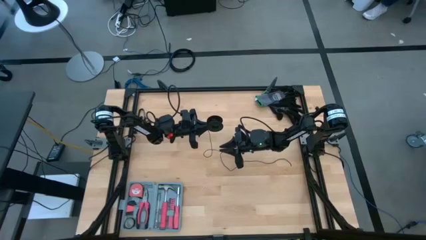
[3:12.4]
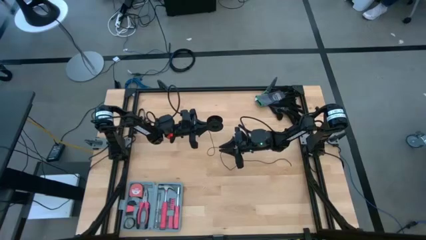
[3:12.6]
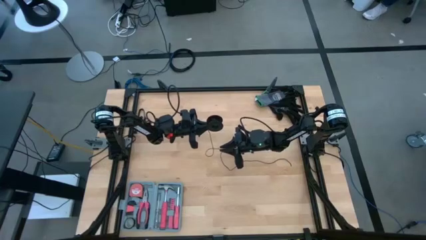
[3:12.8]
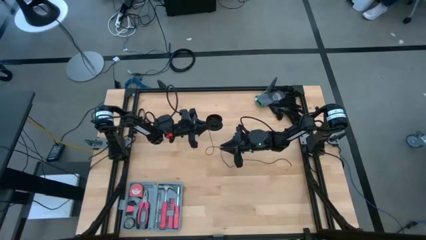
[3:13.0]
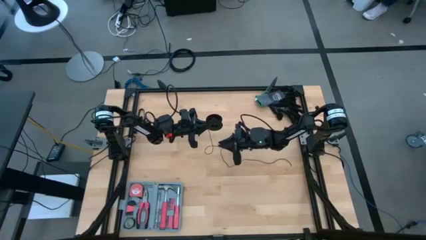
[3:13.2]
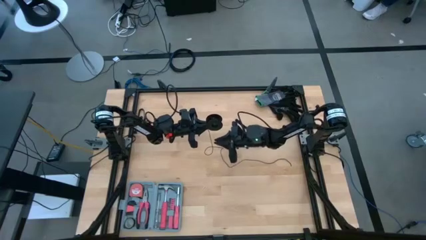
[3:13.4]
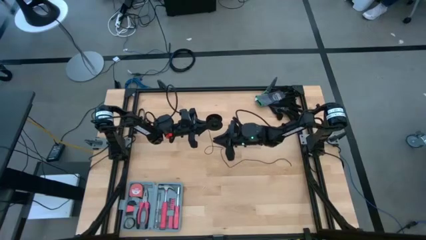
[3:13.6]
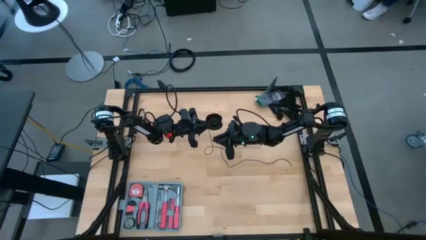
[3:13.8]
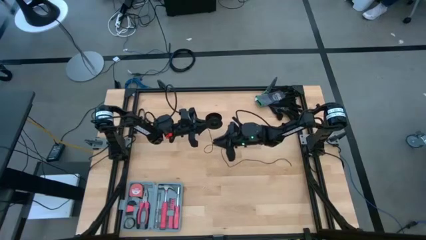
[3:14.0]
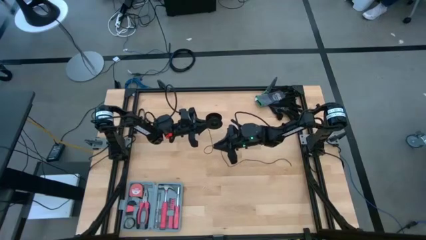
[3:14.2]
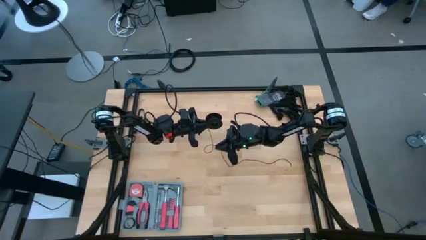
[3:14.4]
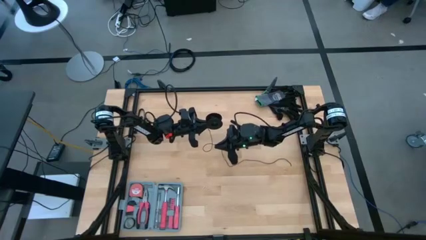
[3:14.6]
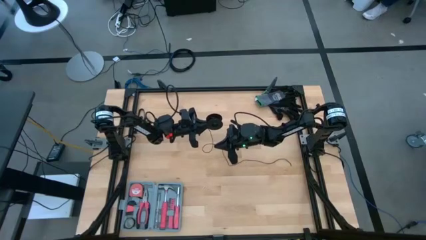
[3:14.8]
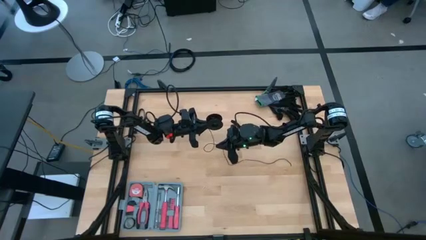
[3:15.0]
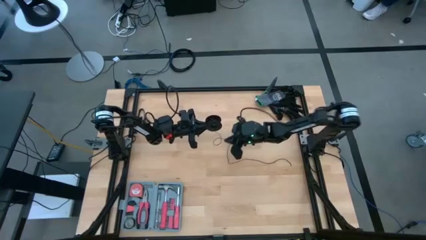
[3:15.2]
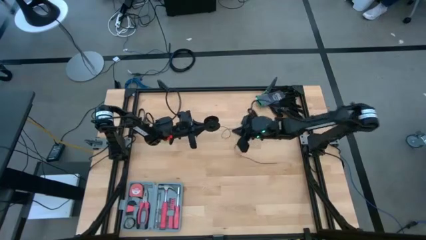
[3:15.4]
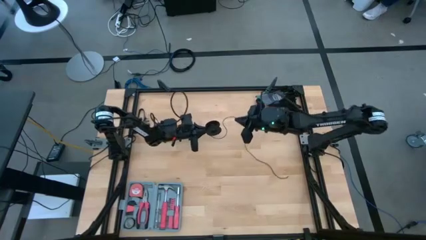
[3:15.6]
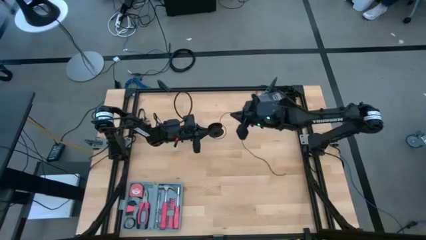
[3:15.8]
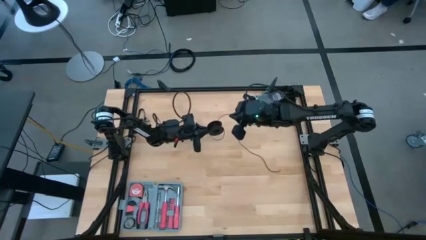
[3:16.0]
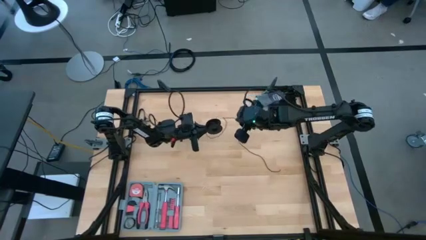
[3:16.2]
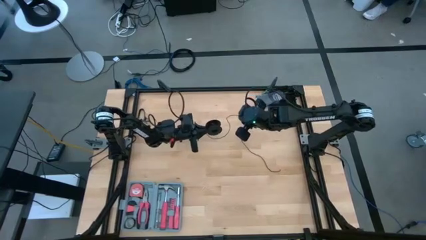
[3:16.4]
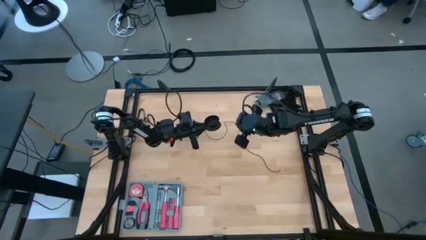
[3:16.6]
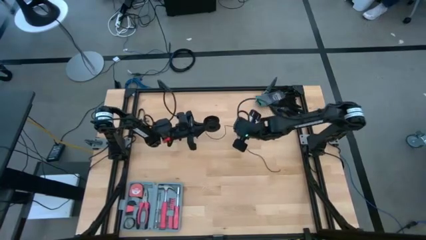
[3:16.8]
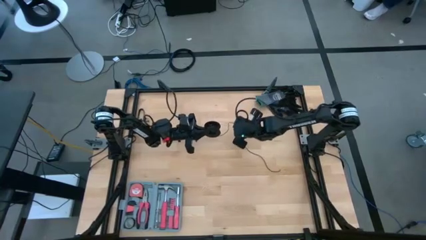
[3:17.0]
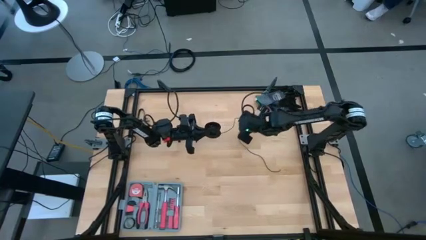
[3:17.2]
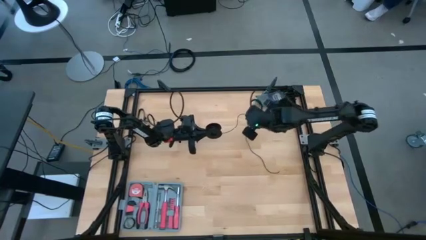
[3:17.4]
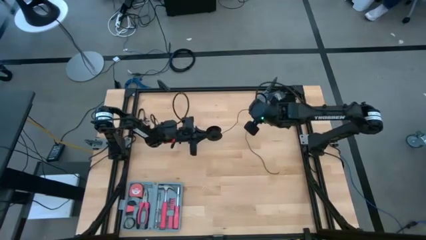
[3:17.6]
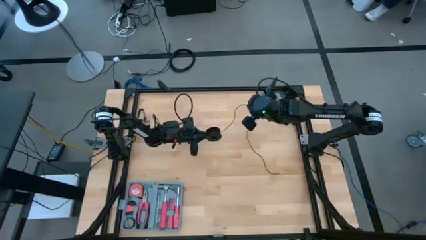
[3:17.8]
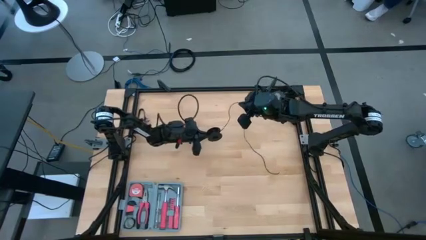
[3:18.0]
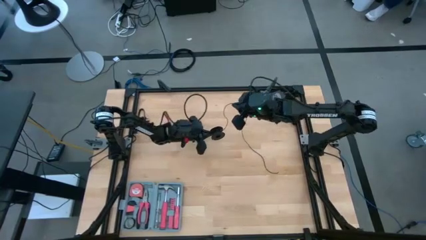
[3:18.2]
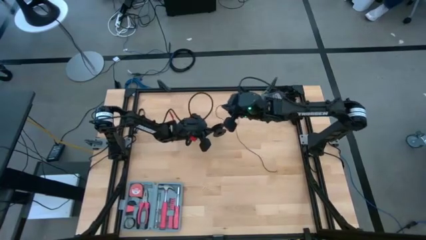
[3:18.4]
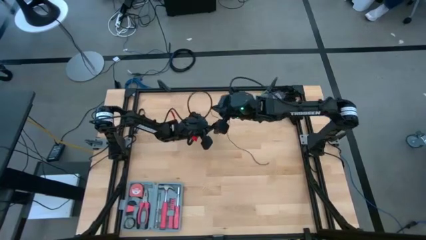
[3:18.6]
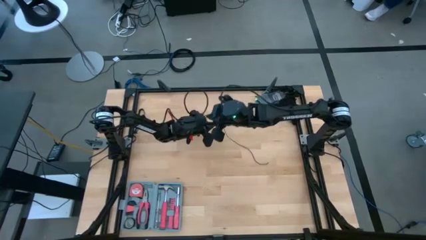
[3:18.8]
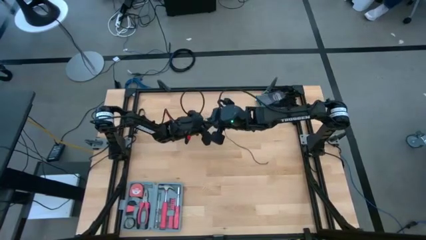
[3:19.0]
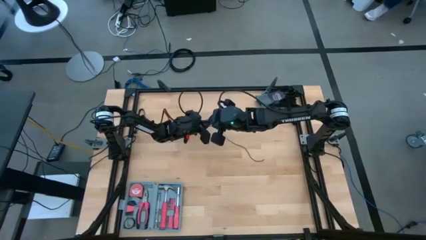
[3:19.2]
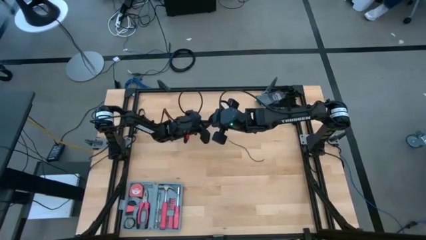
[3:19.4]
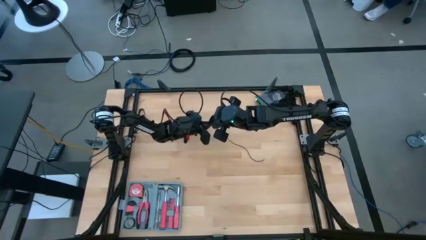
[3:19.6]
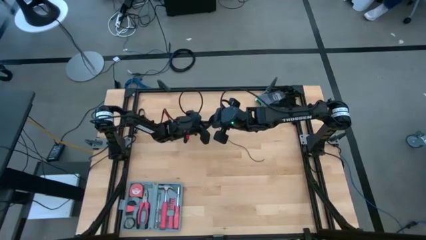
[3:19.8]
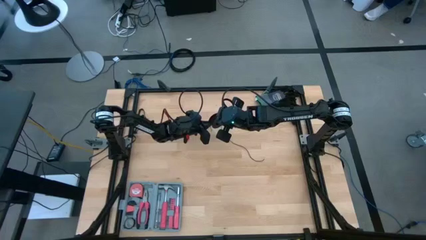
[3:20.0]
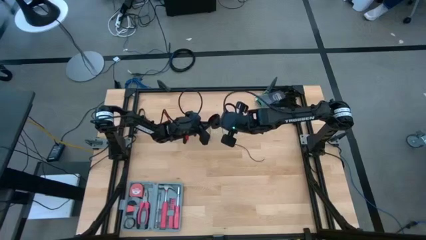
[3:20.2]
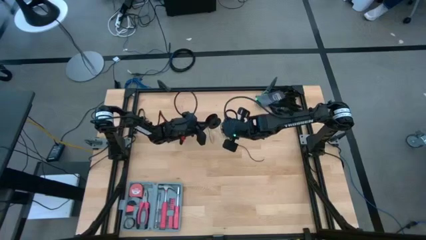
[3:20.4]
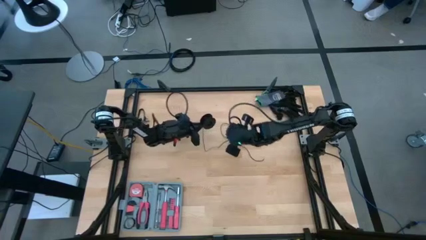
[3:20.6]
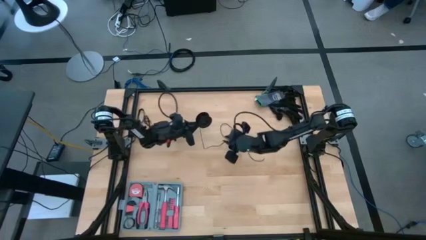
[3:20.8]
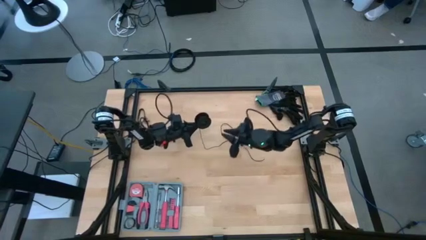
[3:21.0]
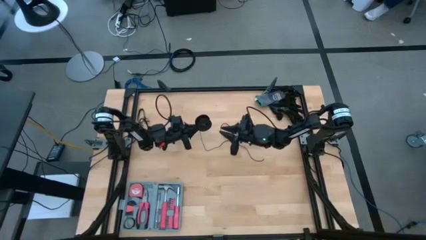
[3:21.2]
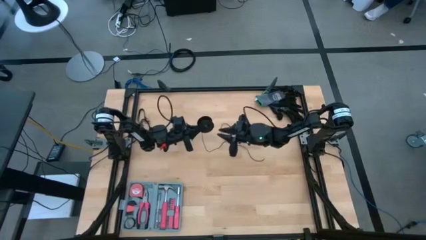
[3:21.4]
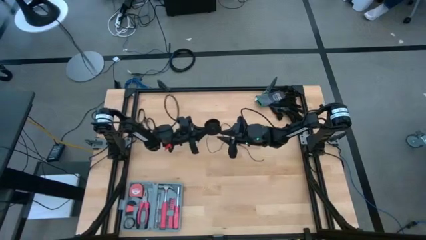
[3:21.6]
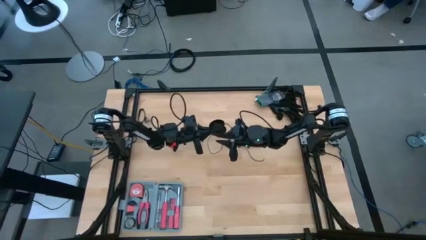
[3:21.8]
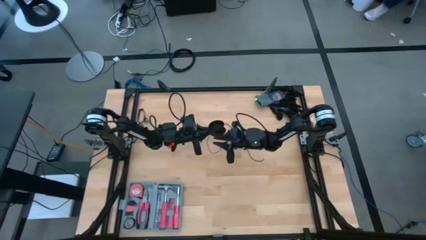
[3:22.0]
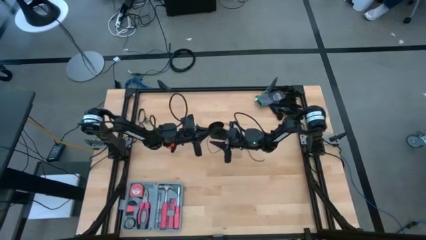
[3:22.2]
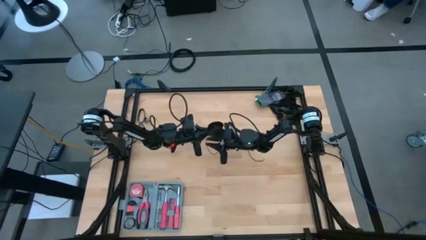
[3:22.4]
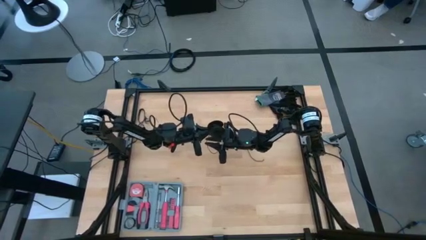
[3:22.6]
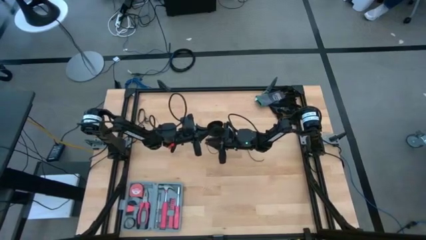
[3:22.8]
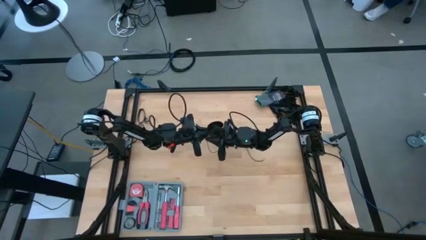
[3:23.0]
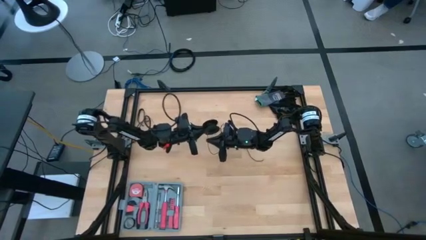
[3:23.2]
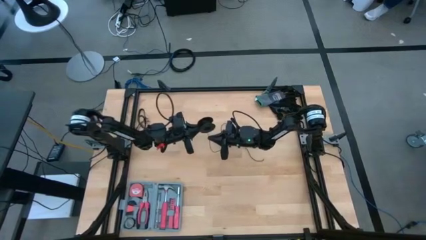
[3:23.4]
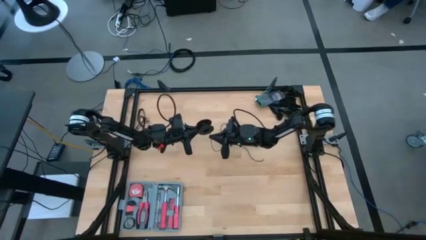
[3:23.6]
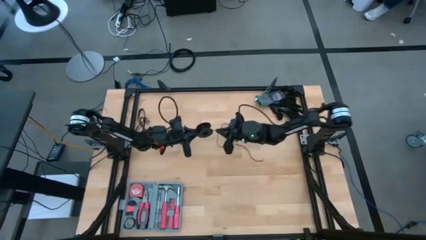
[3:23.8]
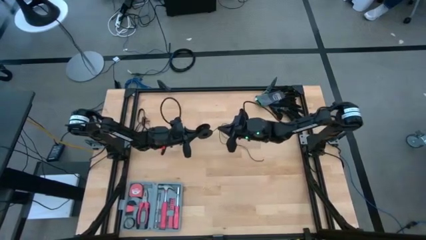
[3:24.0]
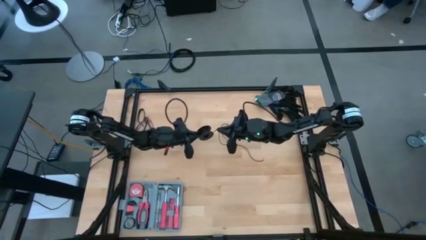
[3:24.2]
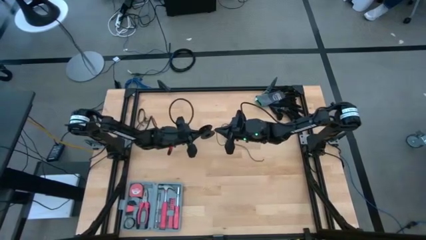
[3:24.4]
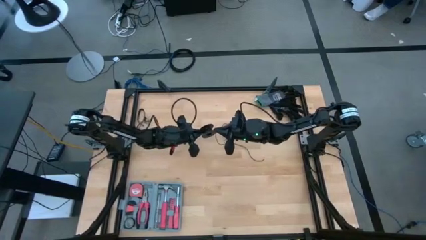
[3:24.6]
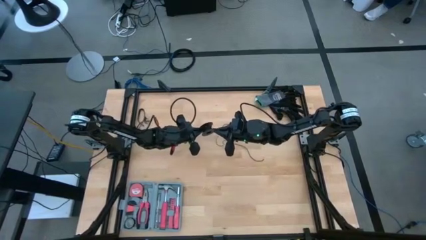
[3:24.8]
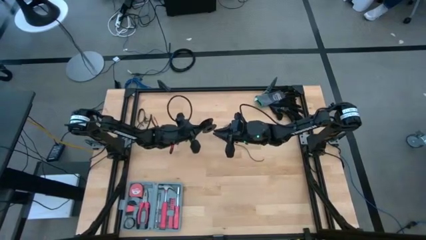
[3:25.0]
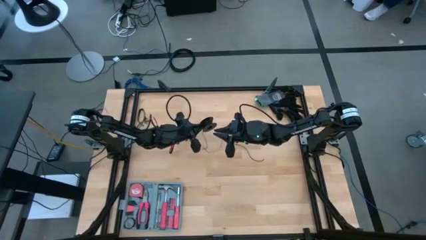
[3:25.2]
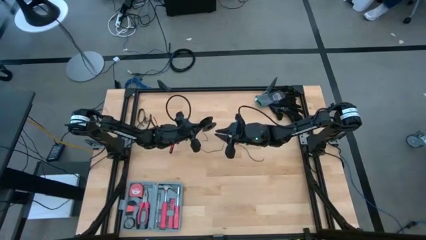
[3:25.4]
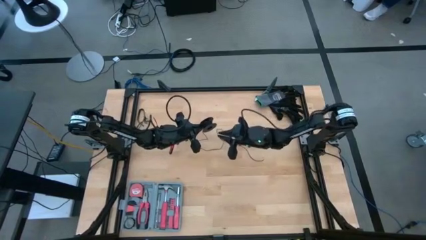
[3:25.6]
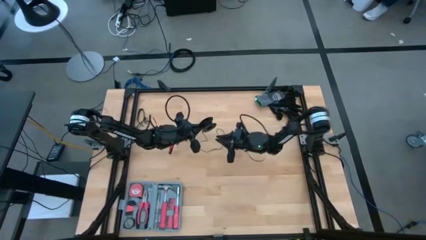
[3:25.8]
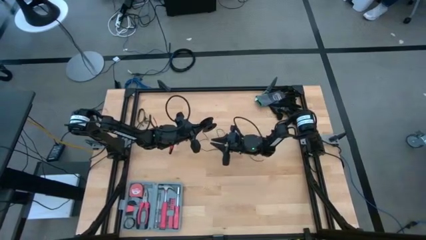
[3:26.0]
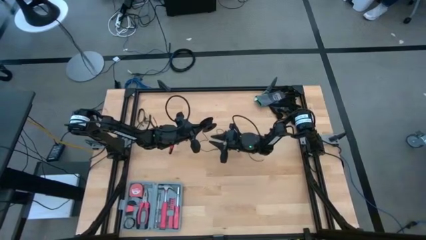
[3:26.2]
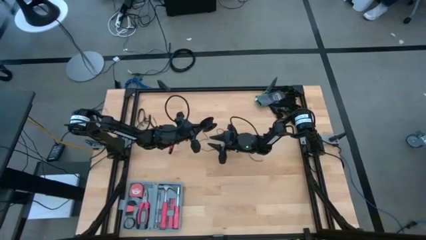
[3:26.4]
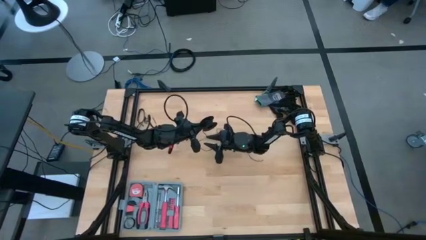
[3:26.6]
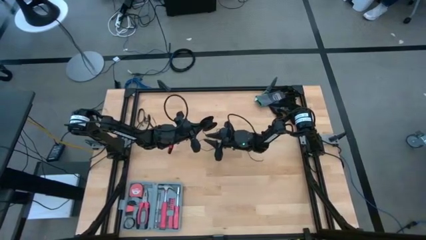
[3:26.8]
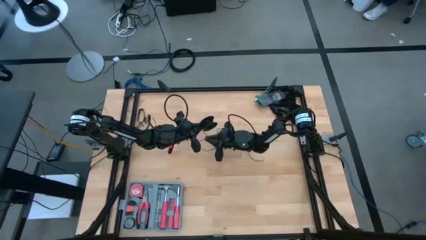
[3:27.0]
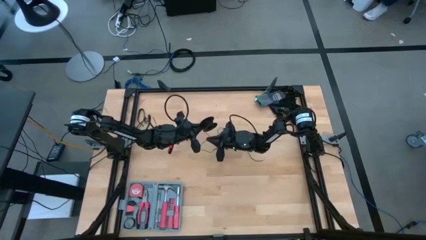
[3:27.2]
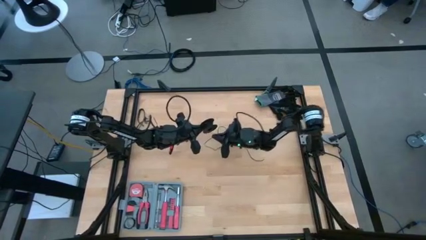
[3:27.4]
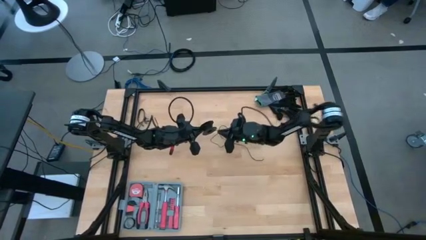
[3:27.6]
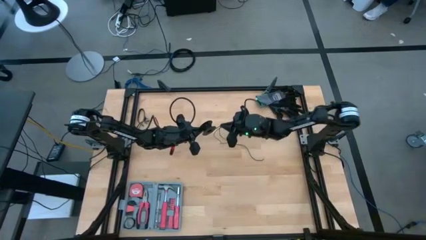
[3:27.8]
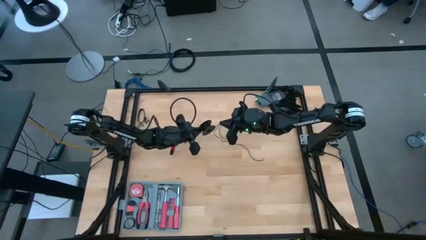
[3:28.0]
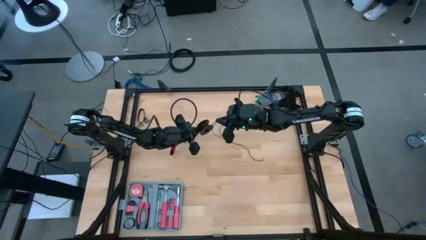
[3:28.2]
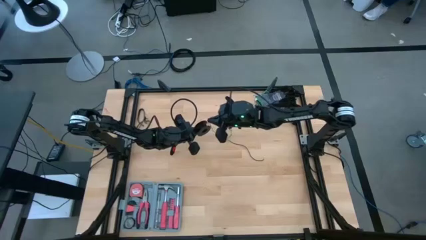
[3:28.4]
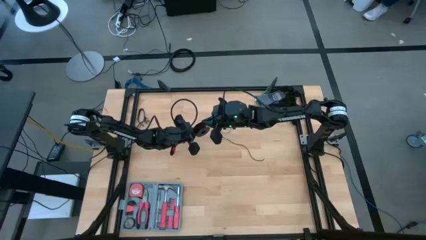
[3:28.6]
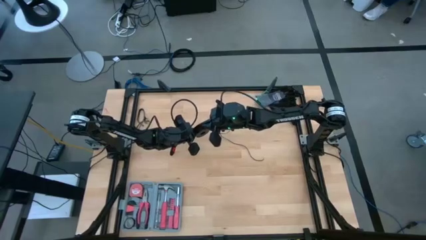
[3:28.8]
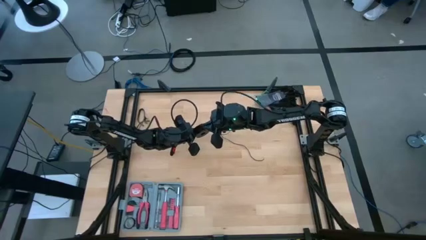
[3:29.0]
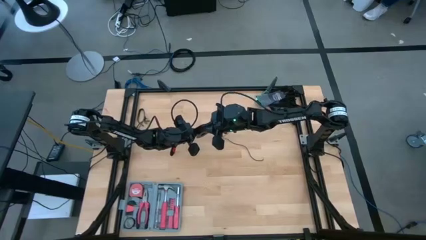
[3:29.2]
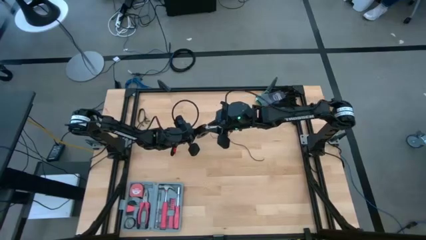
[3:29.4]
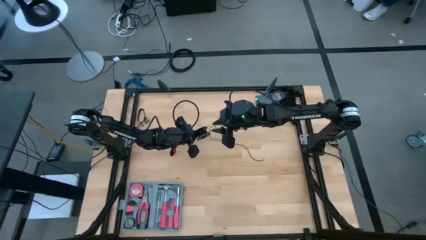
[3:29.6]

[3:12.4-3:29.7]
Task: Coil cords
Coil the black wire on the spool
